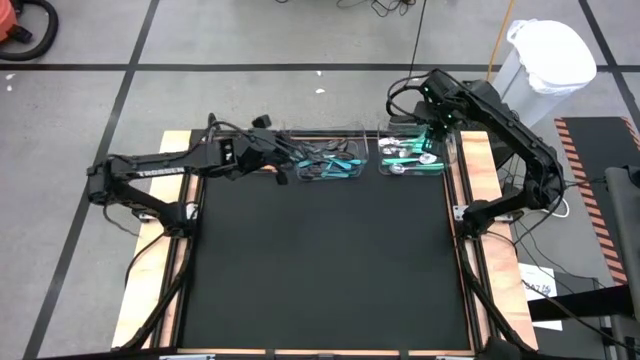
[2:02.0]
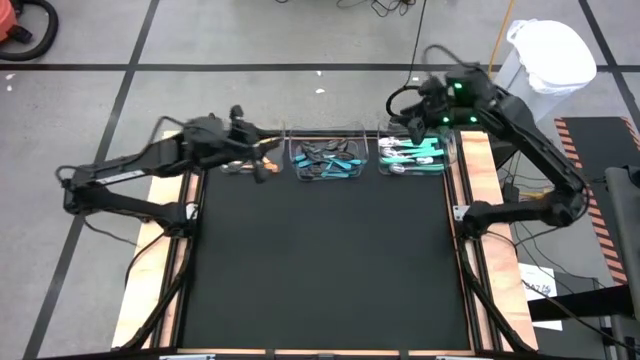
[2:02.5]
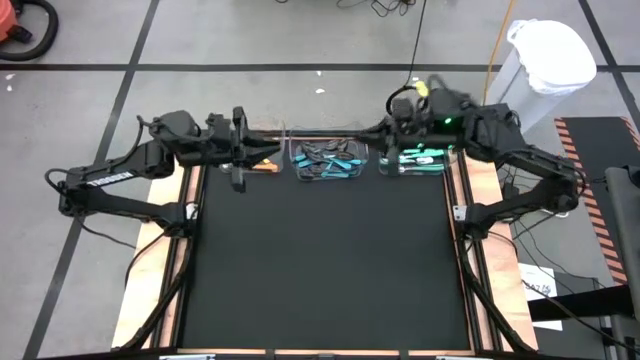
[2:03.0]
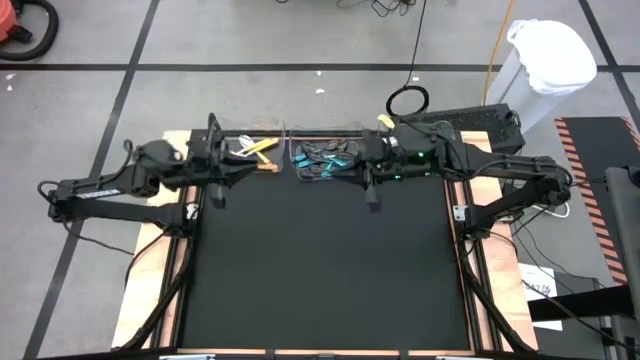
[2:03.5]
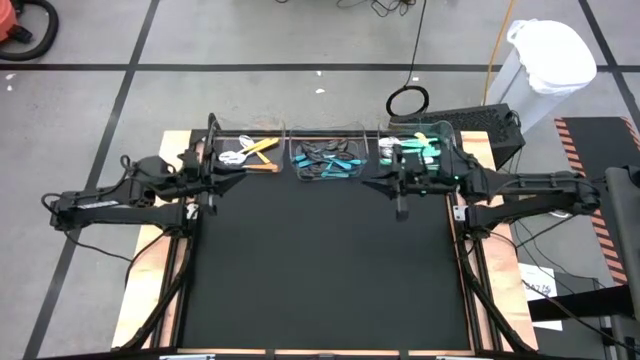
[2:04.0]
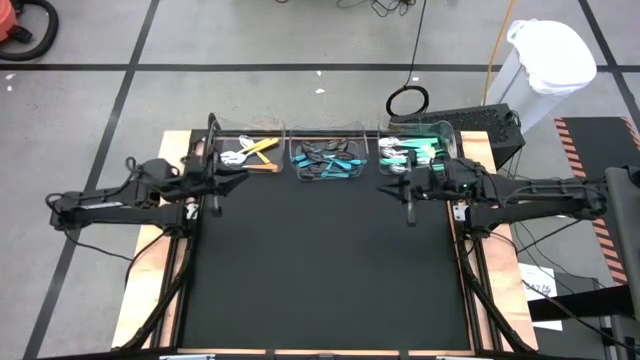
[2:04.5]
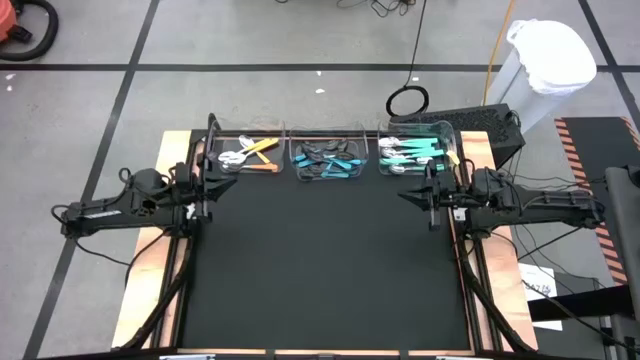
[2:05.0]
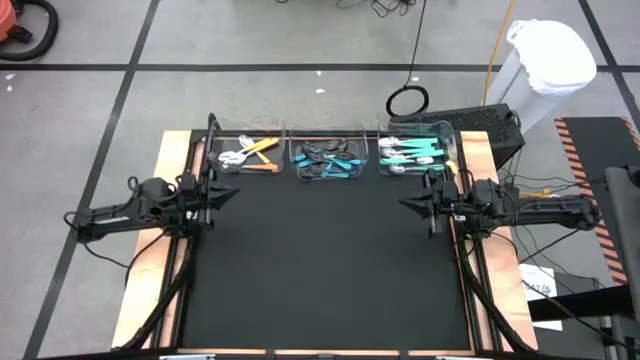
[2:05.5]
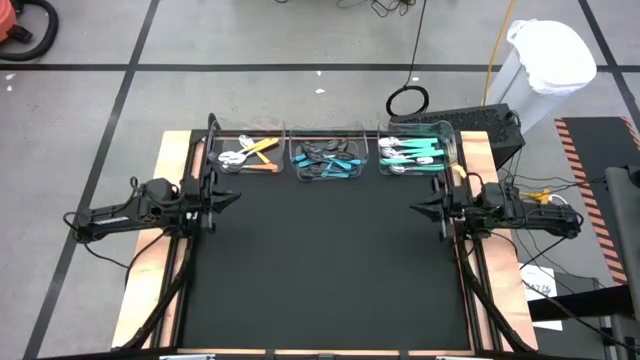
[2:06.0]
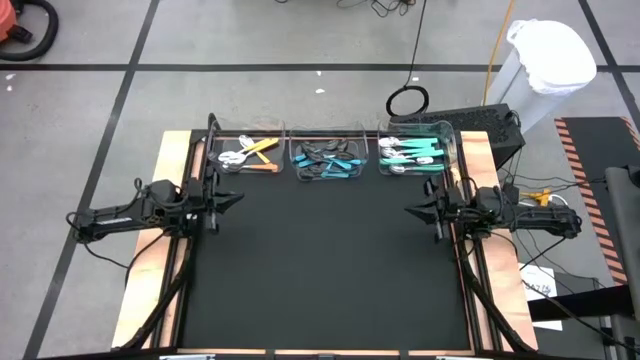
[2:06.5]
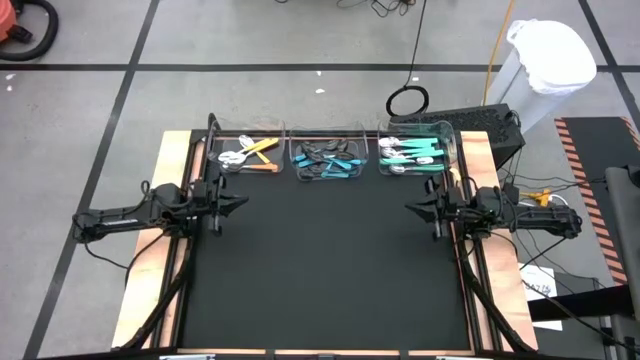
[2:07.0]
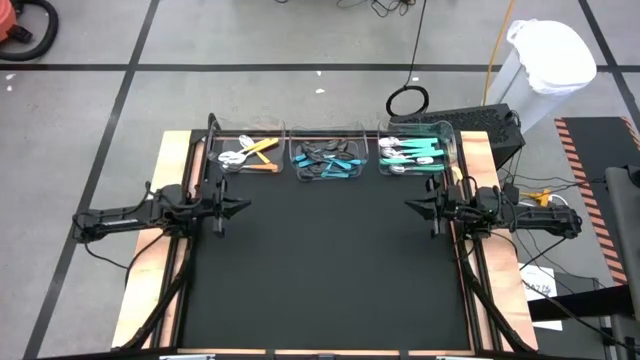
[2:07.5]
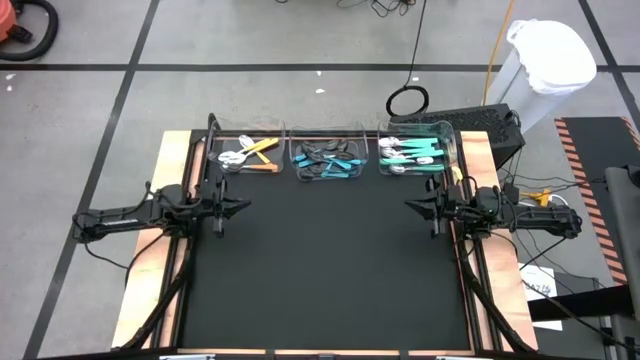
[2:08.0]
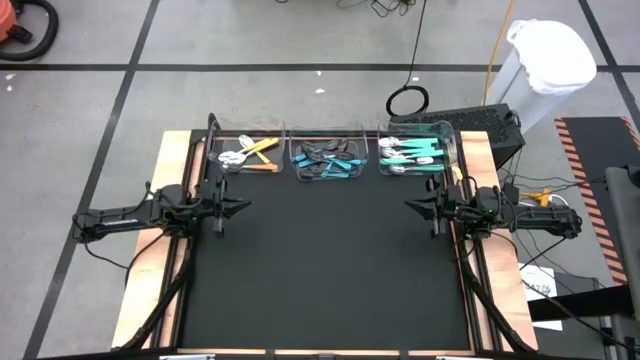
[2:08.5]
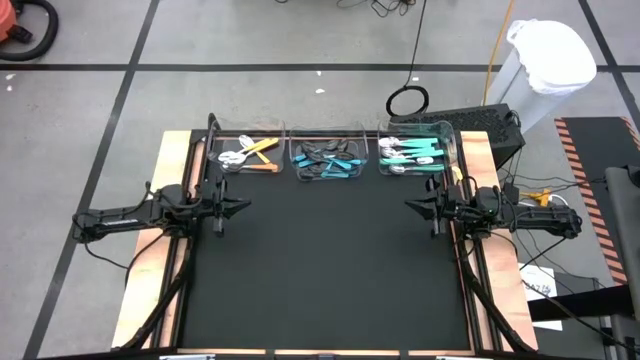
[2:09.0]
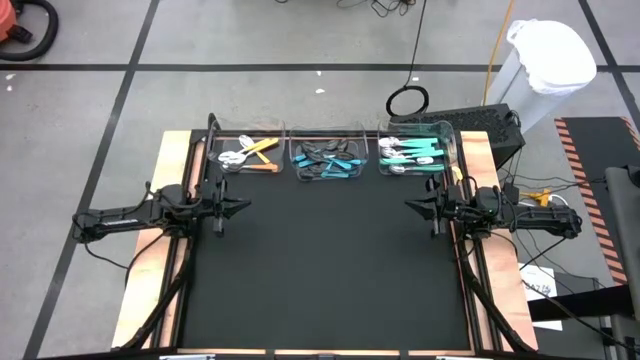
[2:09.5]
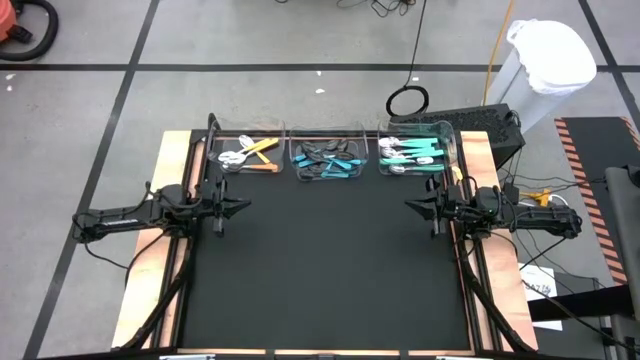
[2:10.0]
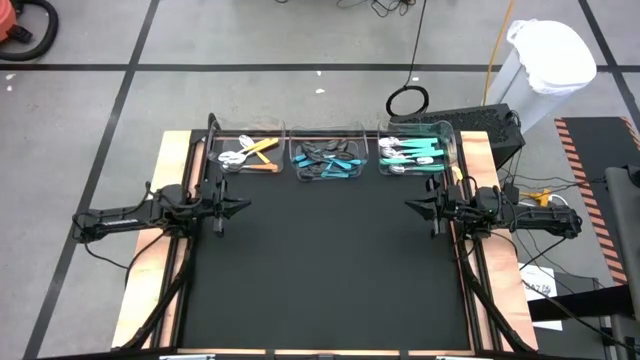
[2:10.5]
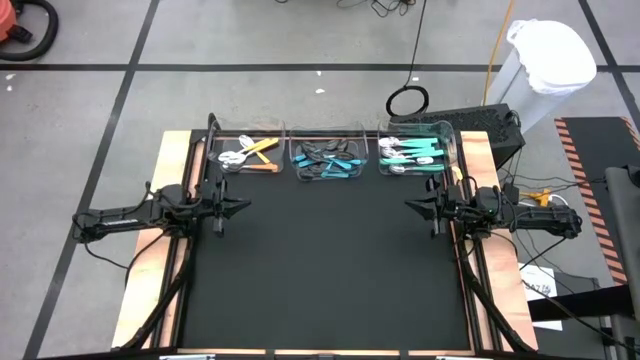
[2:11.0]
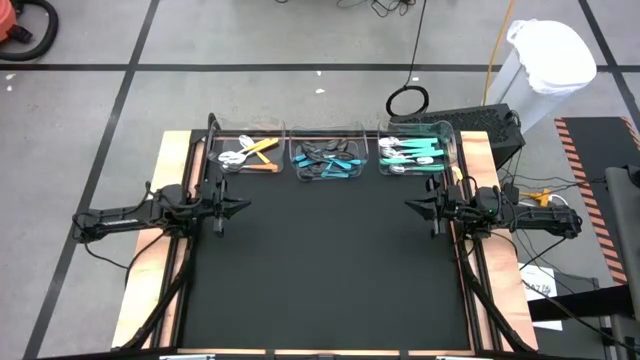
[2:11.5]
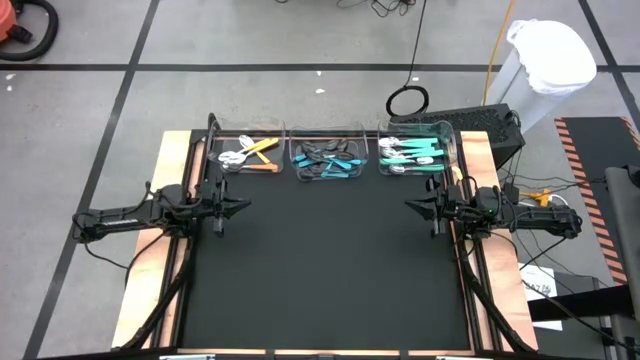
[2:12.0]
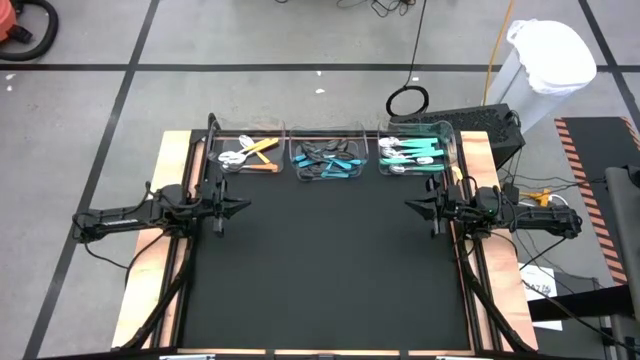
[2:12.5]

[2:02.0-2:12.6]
Task: Sort silverware by color (type)
Return to Home Position

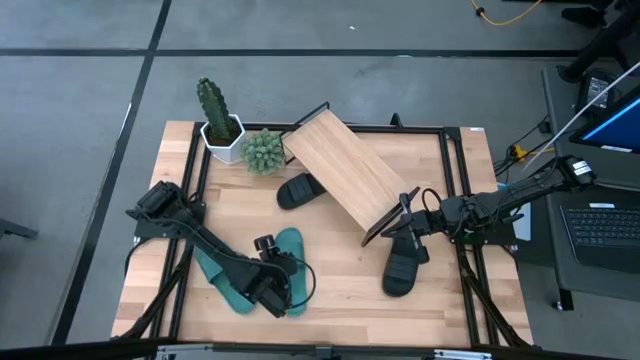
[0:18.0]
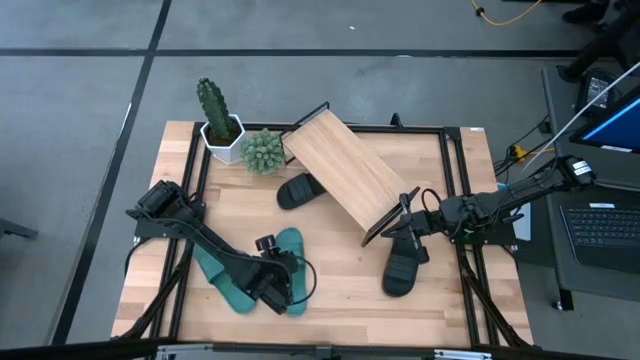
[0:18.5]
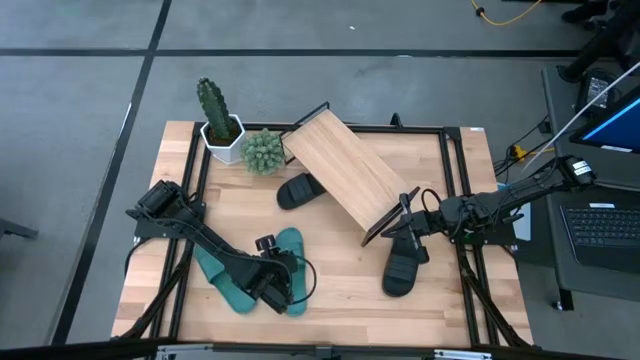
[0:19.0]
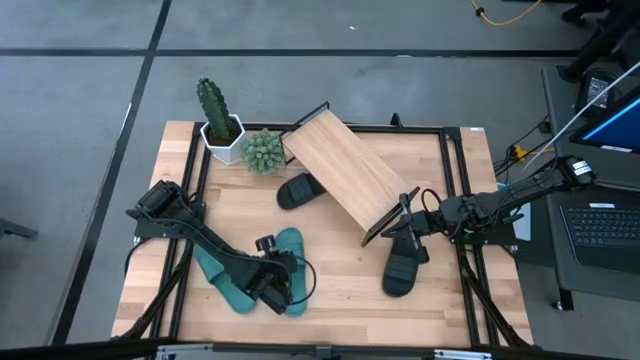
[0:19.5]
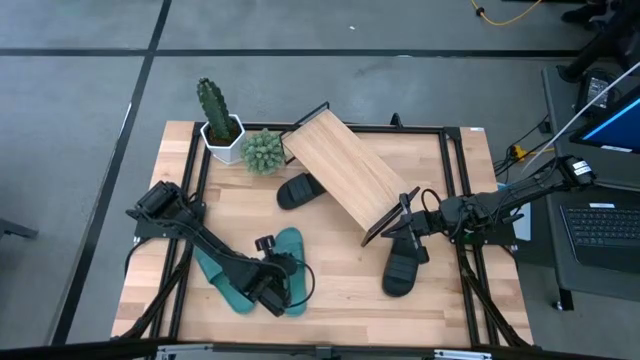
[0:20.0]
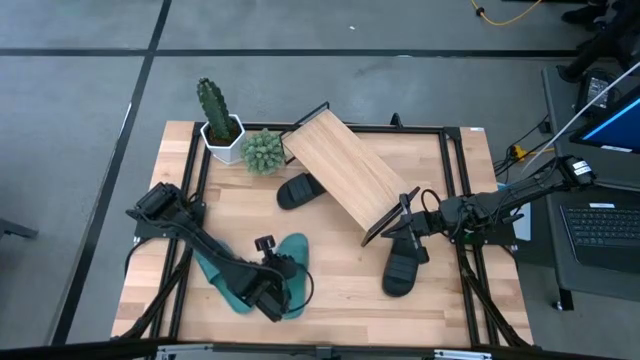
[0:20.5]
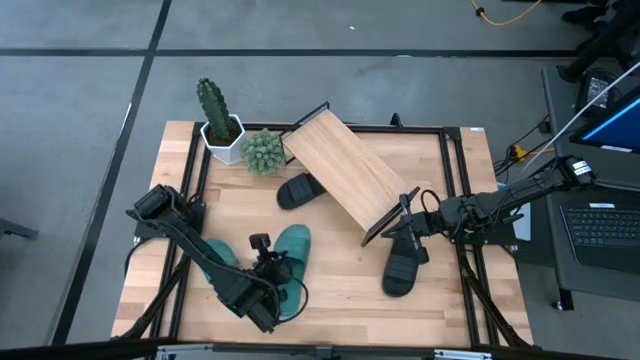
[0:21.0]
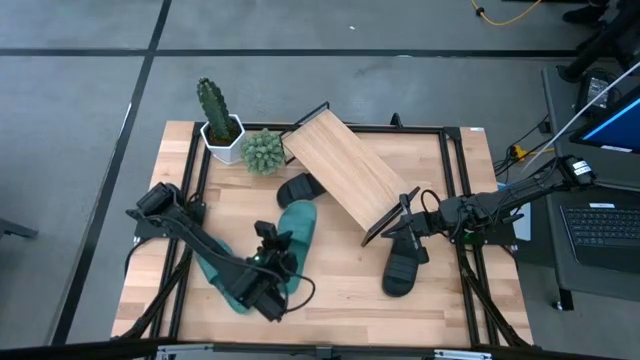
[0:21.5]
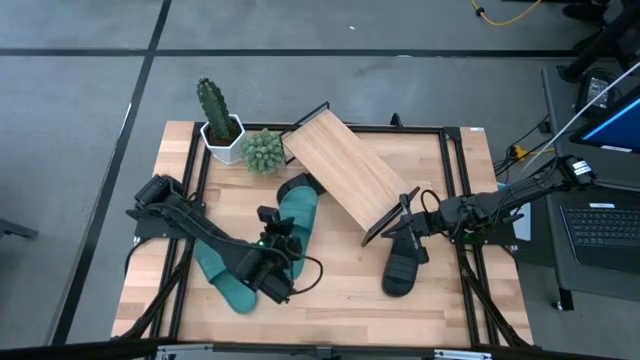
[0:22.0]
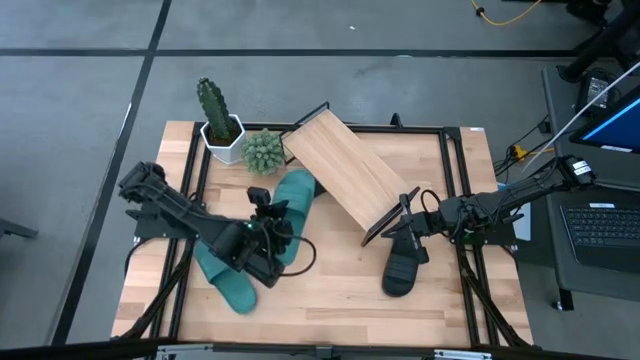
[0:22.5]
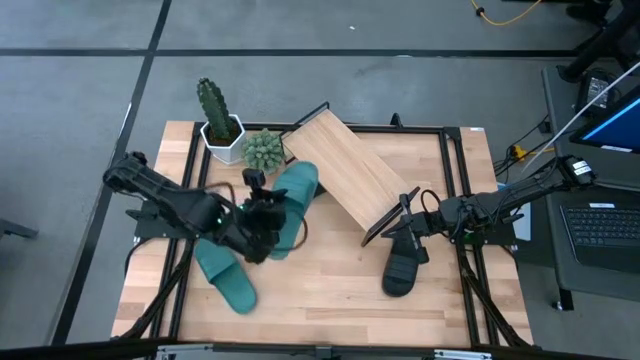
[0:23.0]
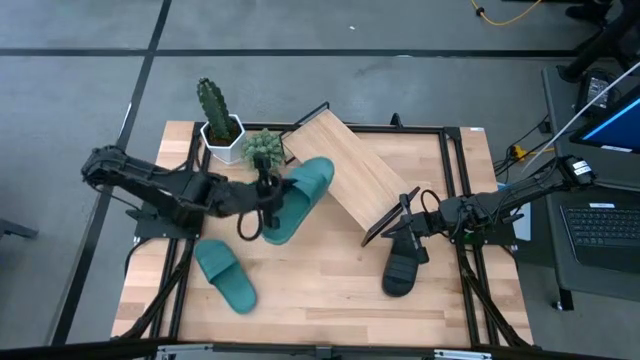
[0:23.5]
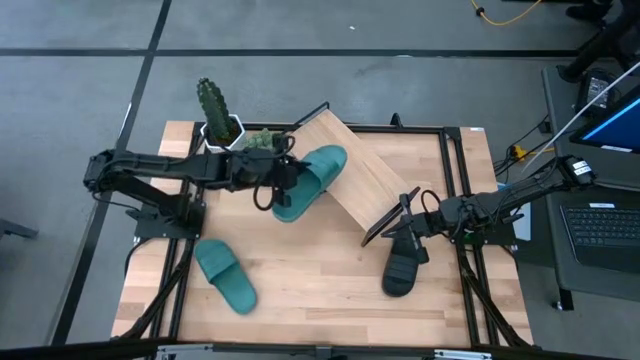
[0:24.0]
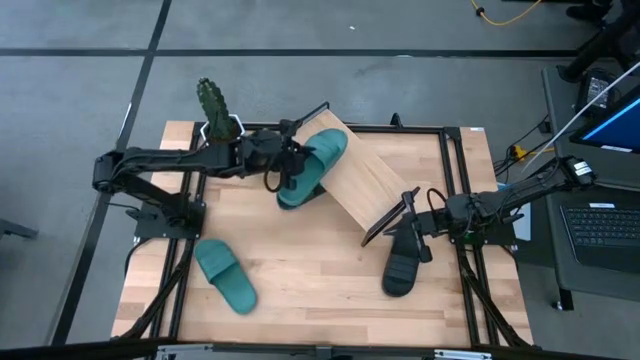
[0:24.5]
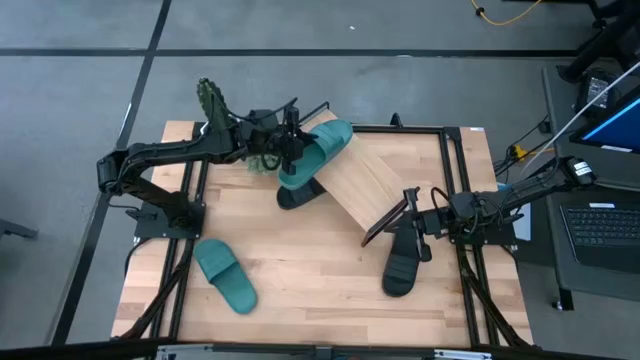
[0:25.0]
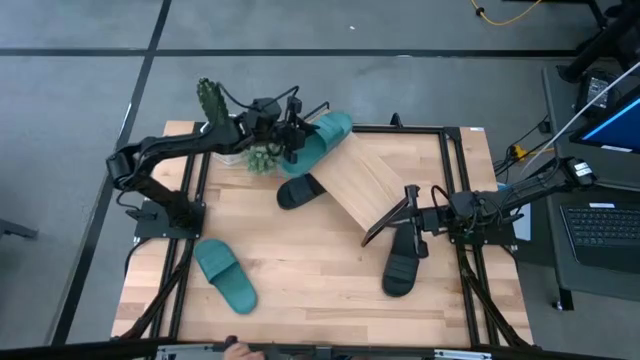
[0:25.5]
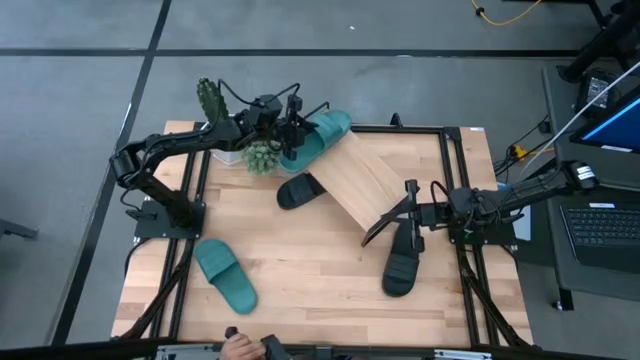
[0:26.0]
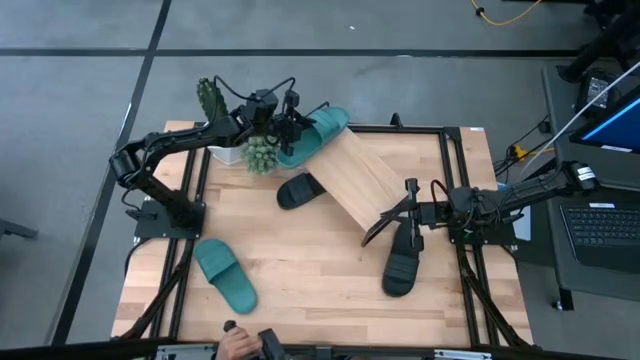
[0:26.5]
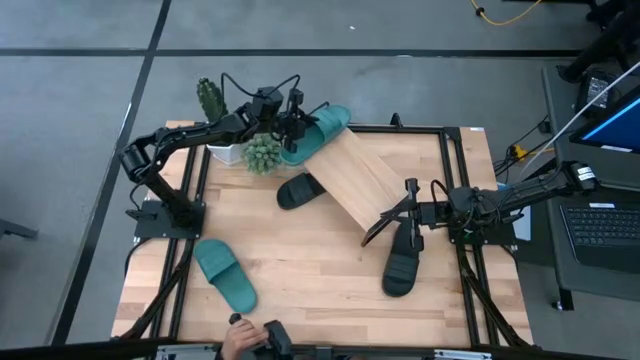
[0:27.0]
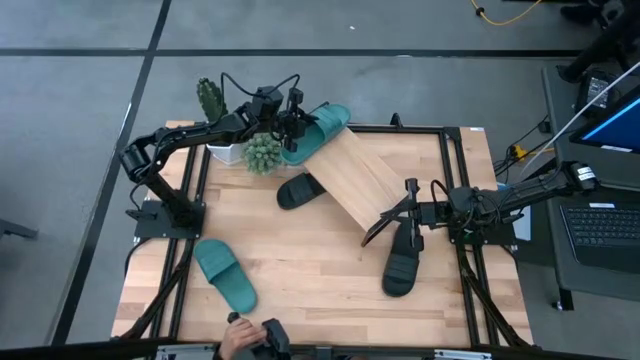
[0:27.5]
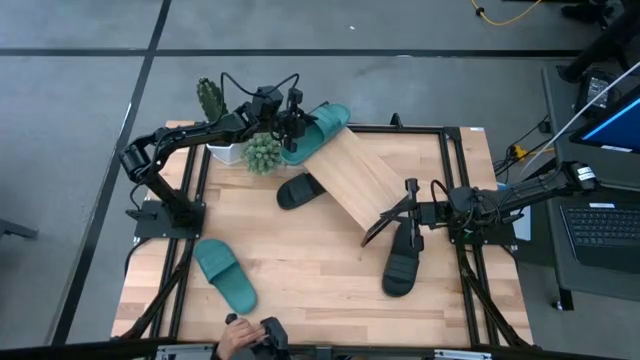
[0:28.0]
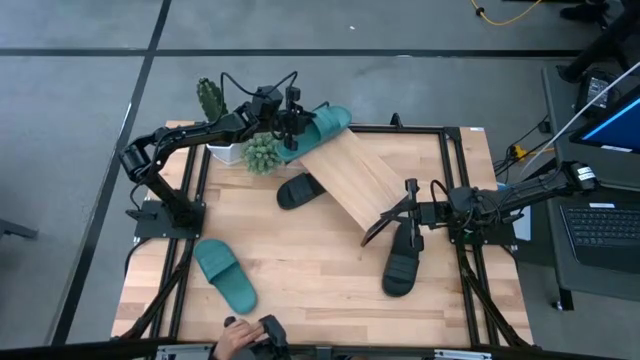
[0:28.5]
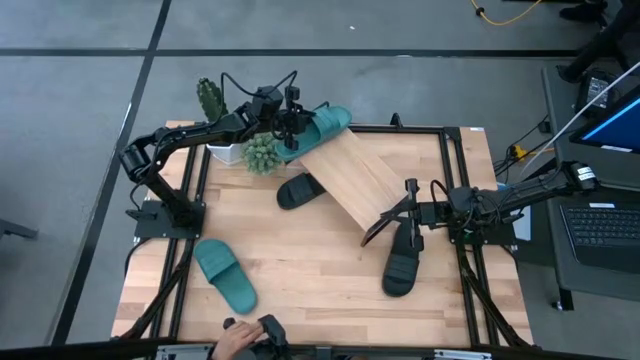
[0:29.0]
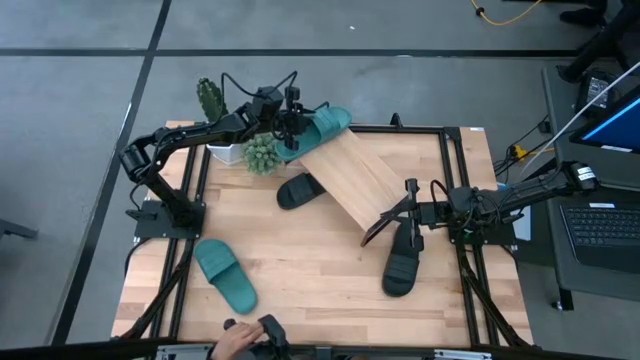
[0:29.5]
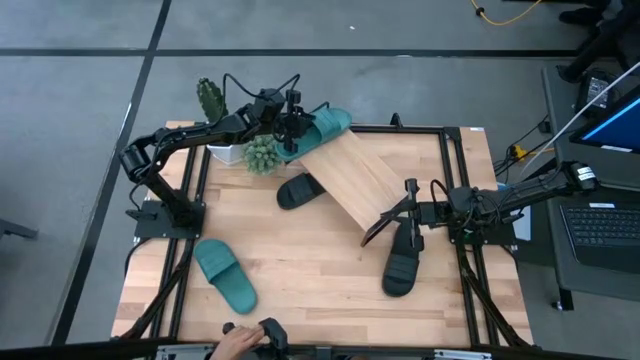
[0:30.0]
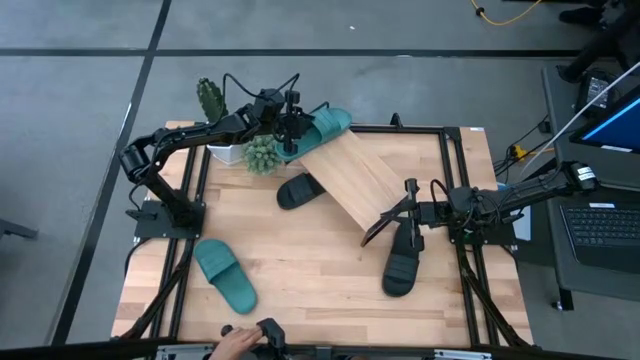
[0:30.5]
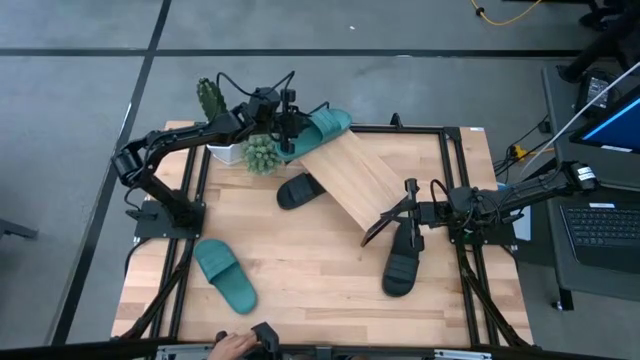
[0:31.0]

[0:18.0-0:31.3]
Task: Pick and place slides into the shelf
Put the right green slides on the shelf
